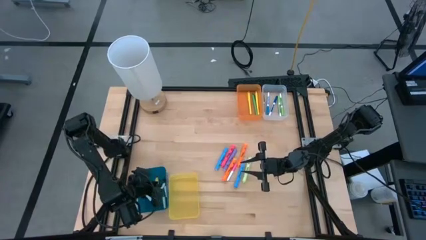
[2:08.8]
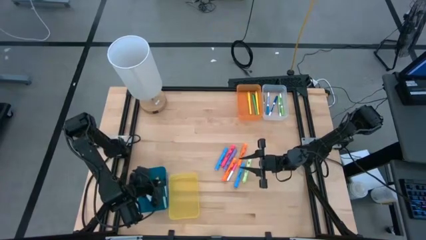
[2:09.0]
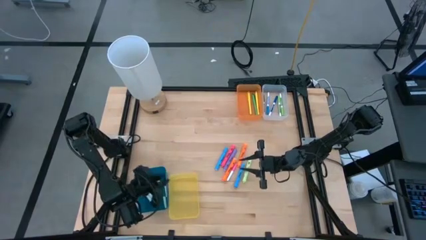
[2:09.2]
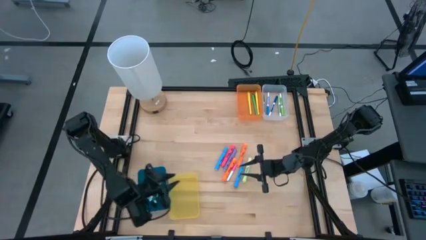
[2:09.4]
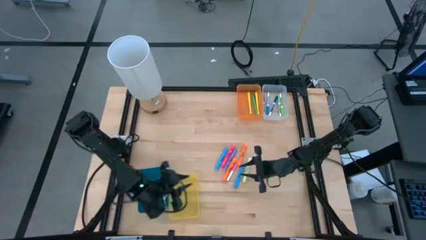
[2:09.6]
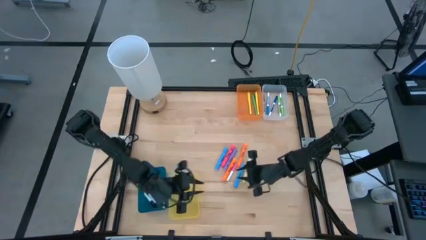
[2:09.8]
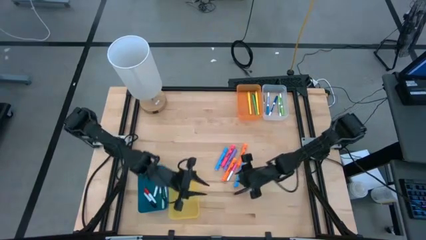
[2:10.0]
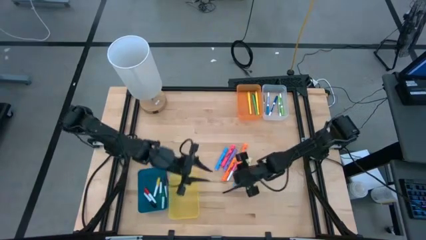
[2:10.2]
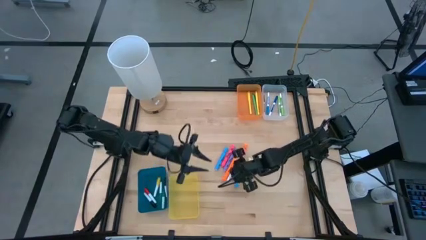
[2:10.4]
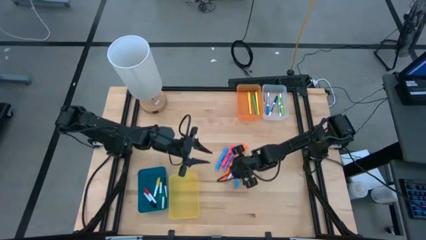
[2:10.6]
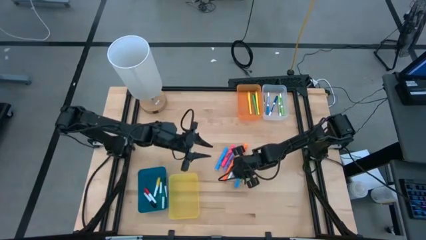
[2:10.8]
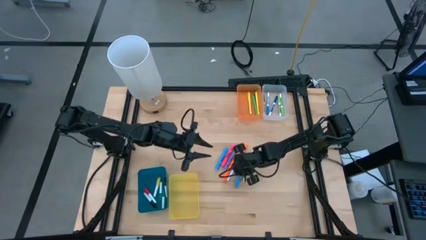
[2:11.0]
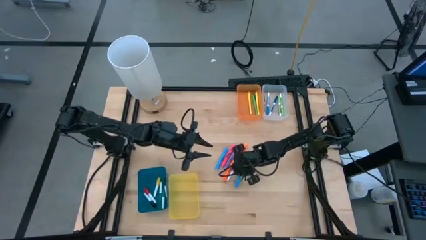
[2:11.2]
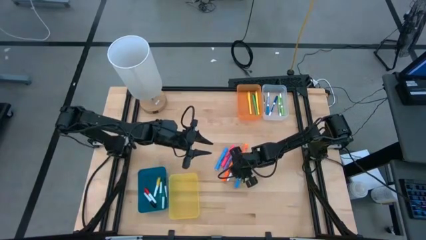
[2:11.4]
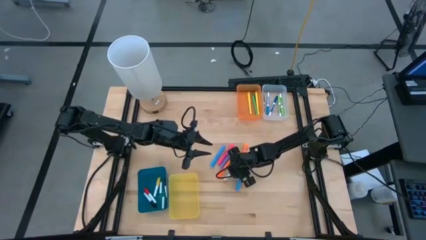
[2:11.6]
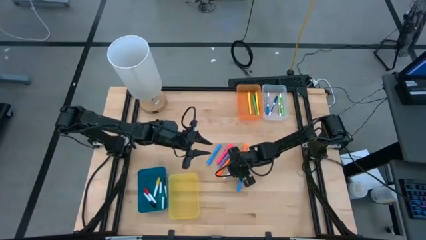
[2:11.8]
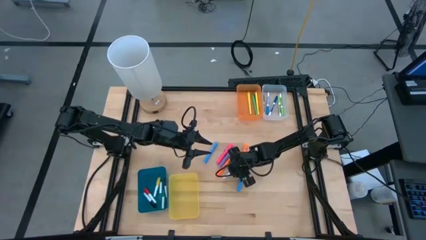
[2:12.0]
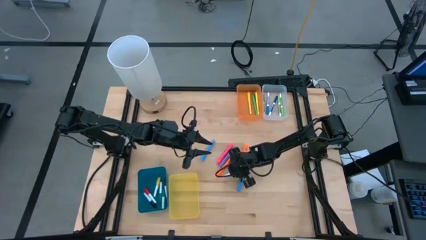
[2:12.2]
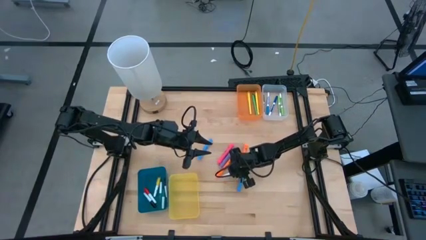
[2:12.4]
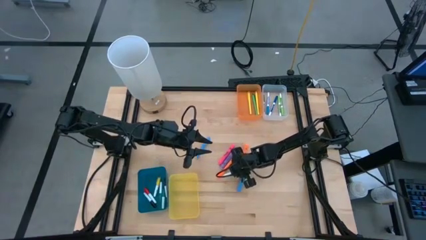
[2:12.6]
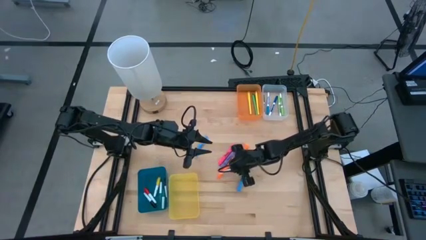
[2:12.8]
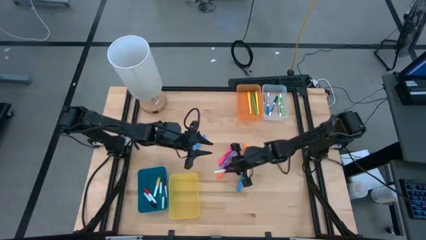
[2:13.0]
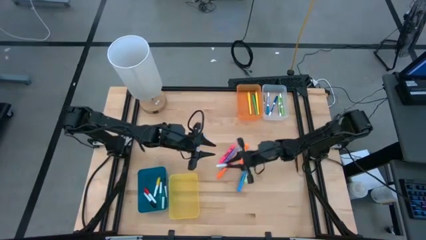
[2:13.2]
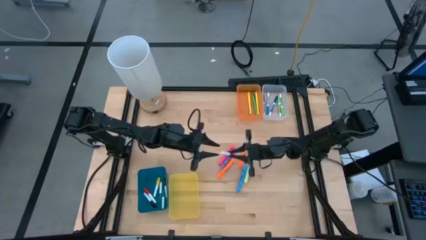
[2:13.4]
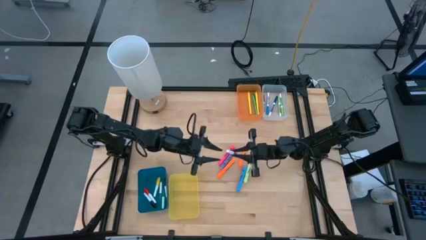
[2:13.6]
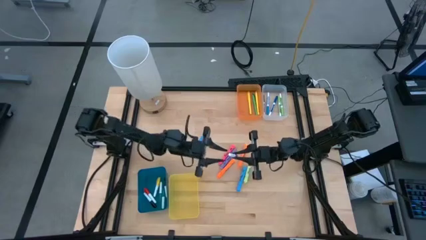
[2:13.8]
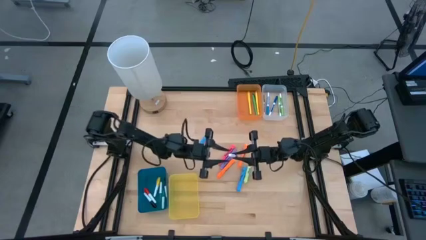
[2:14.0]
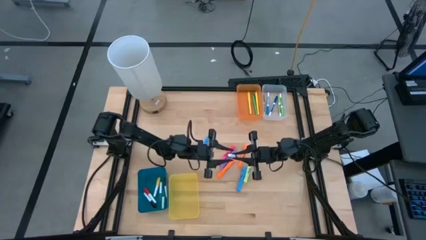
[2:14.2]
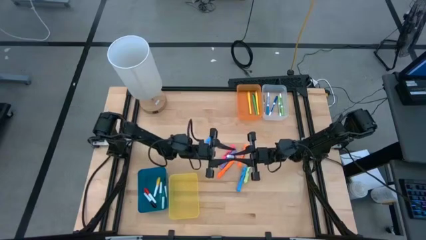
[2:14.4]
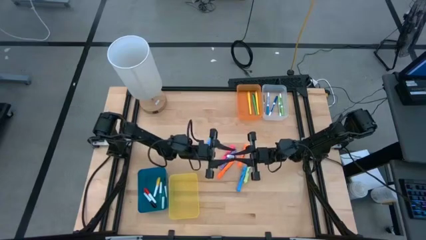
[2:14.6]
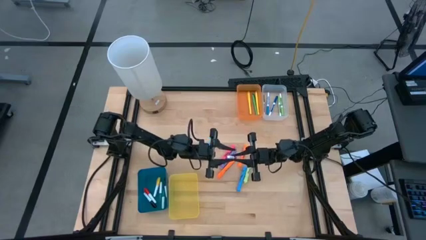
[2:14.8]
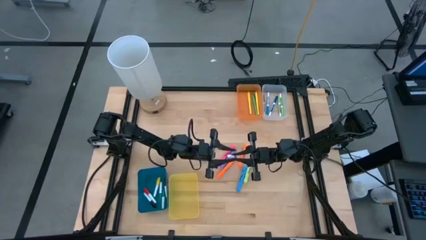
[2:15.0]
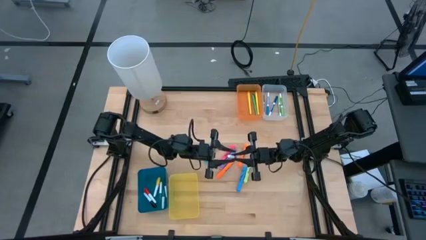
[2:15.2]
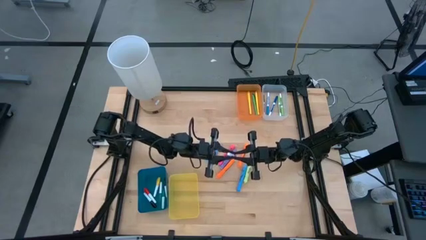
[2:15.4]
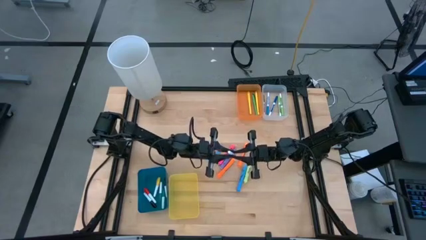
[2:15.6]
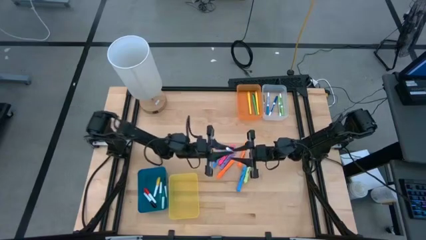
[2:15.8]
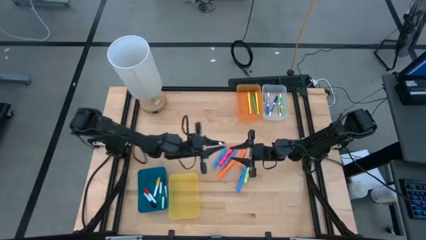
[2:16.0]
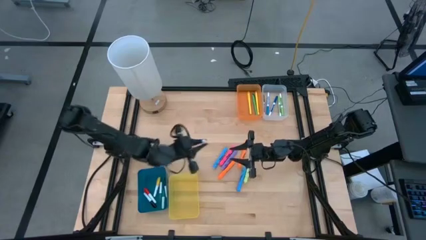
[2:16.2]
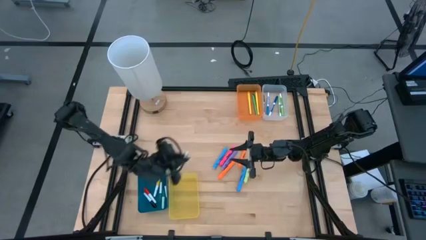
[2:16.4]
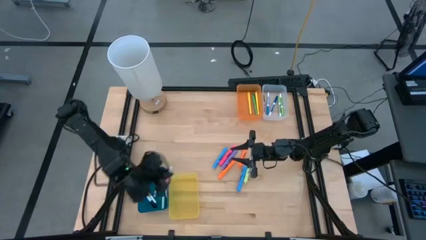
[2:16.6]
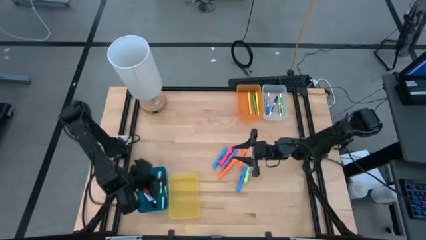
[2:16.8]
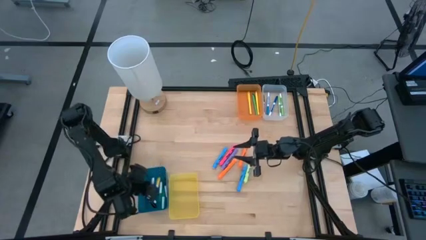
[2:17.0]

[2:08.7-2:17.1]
Task: Pick & Place Markers
Put the white and pink highlighter pen into the blue bin

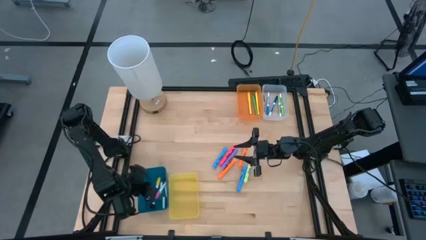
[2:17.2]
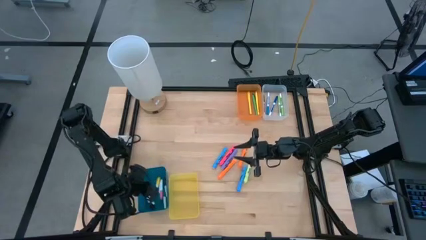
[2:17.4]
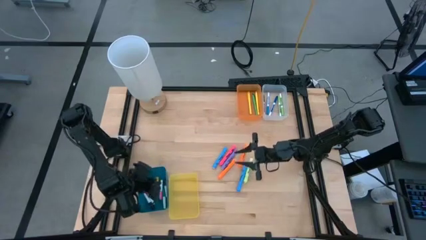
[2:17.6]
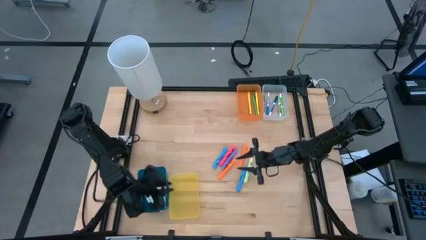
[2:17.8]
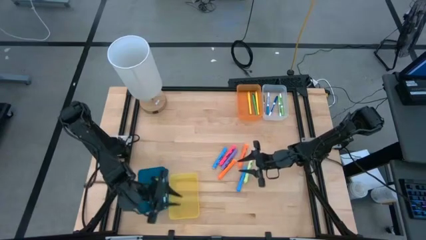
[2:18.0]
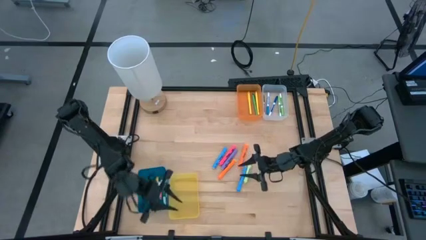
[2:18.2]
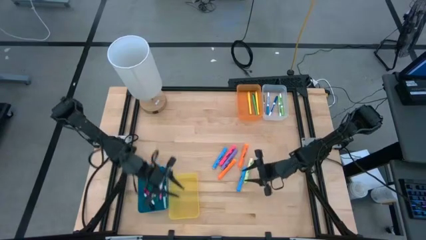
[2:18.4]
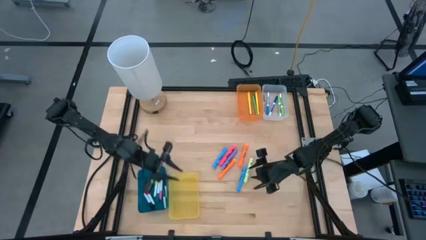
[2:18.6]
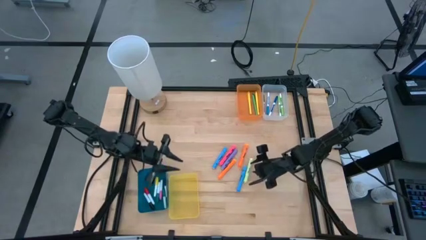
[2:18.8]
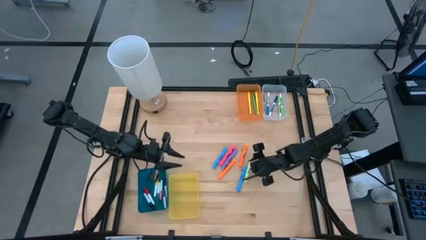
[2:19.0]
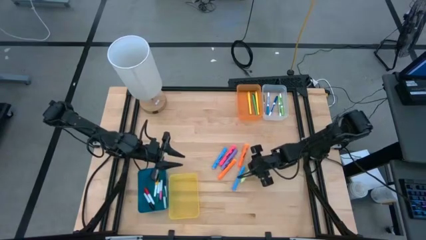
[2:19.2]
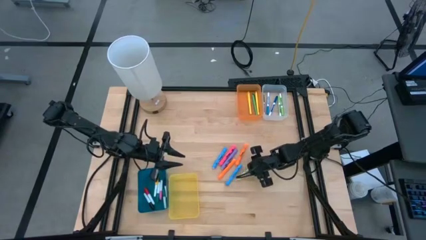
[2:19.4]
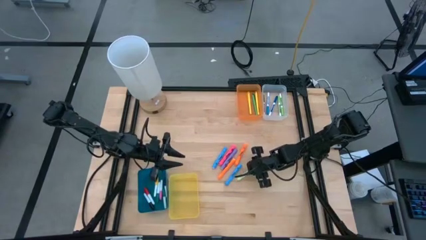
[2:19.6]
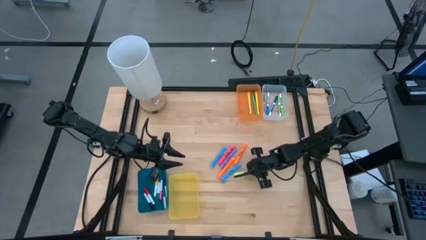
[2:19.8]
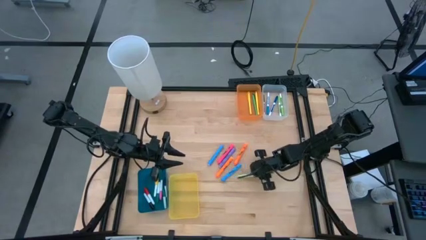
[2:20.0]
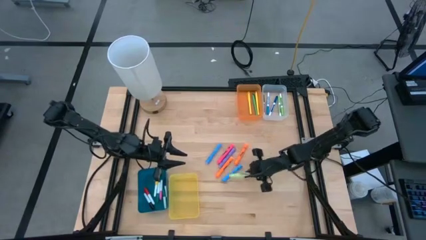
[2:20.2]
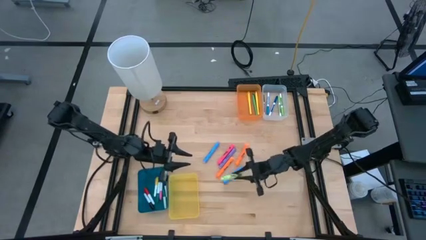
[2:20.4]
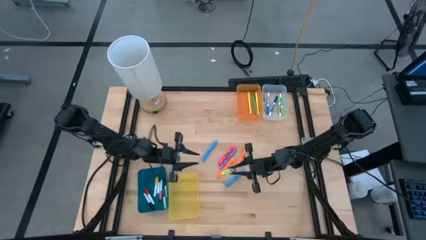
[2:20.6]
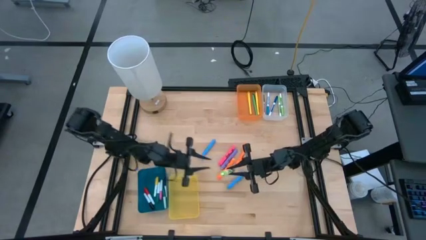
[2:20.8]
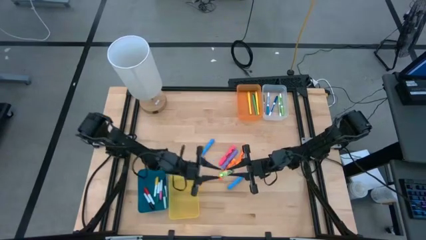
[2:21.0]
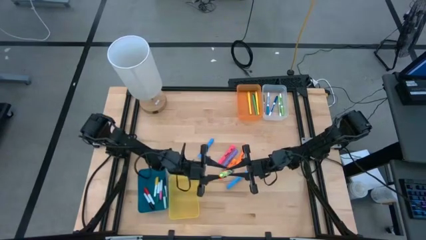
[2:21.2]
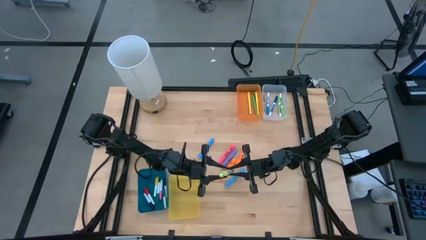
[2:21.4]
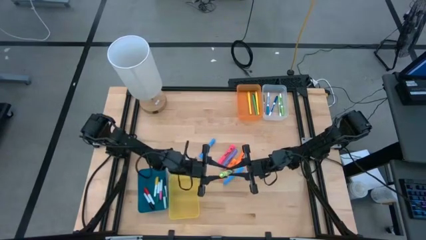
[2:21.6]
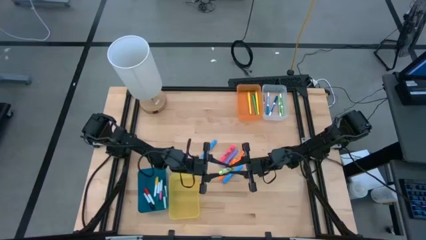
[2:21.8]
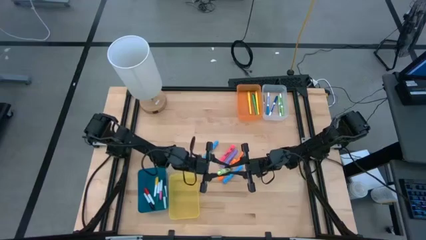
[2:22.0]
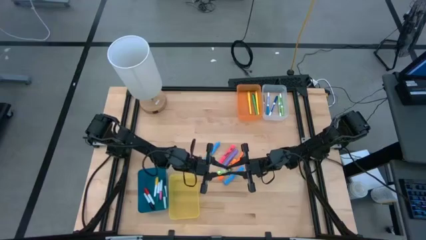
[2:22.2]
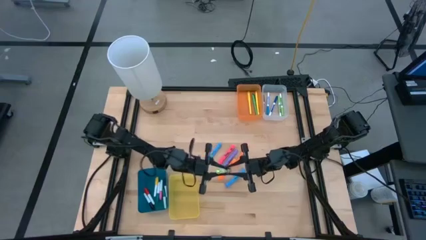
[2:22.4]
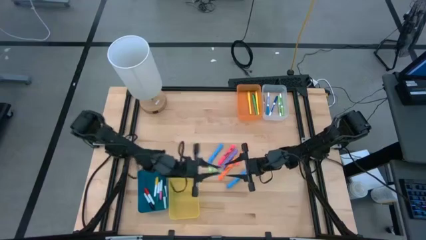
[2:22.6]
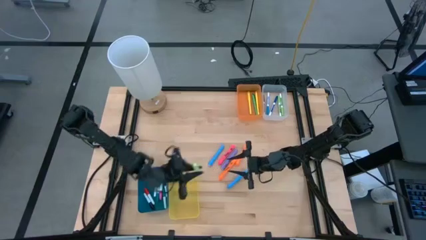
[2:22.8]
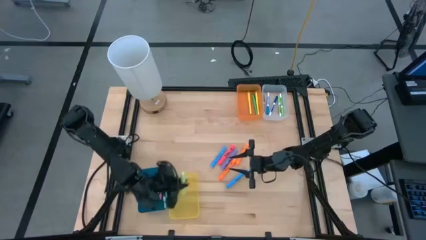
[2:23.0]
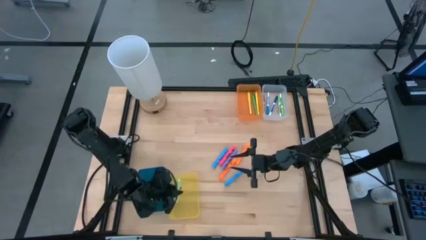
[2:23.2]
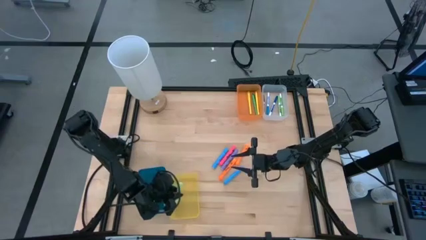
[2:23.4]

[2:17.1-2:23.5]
Put the light green highlighter pen into the yellow bin
